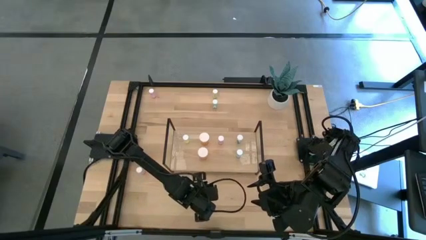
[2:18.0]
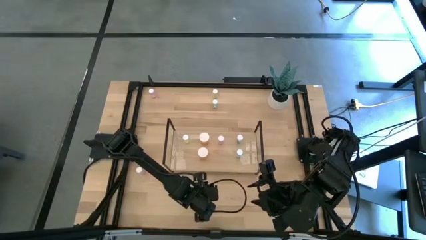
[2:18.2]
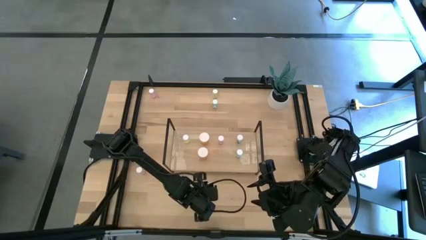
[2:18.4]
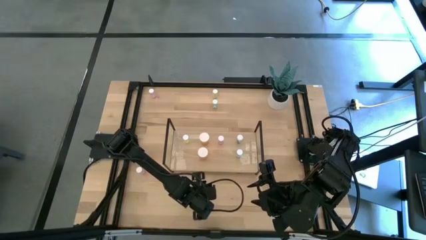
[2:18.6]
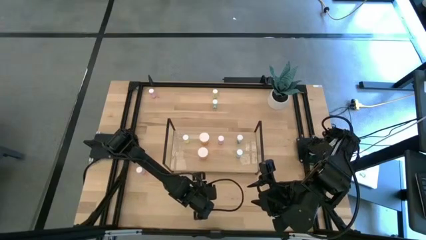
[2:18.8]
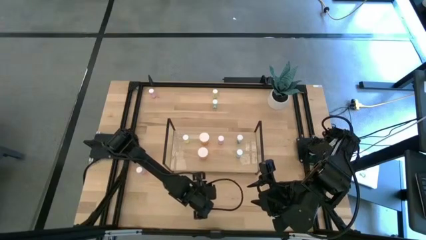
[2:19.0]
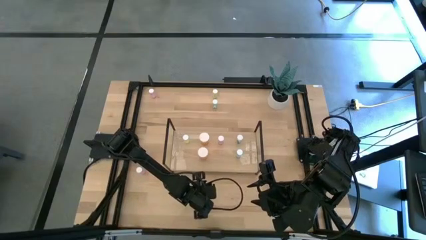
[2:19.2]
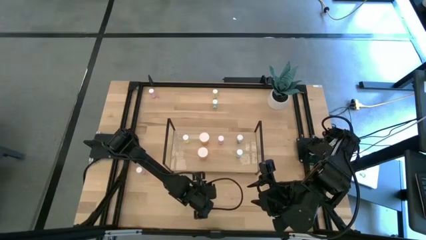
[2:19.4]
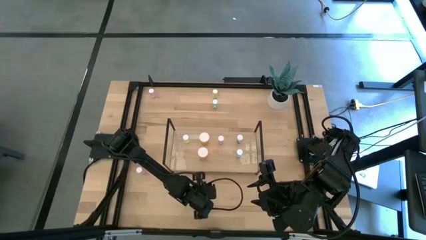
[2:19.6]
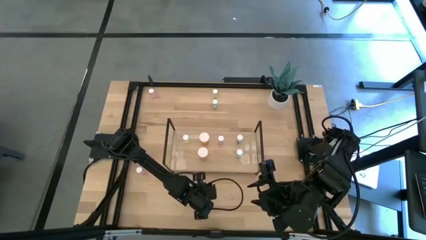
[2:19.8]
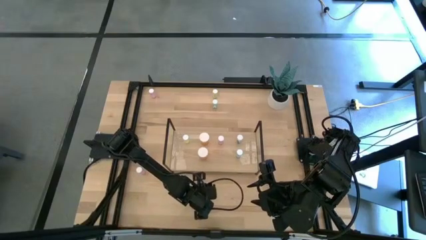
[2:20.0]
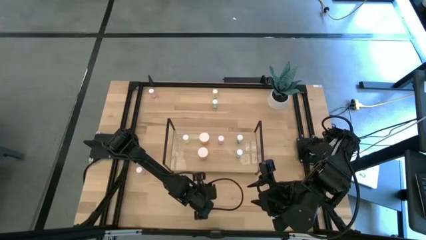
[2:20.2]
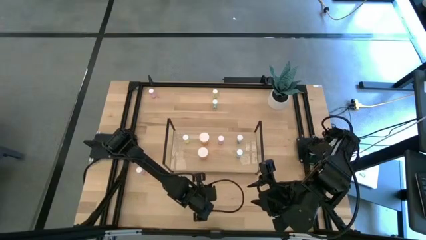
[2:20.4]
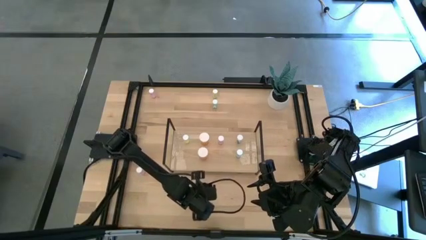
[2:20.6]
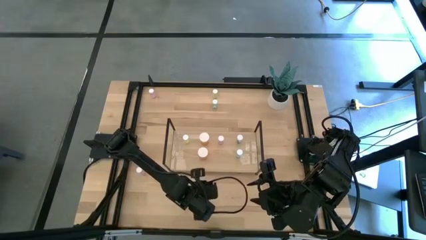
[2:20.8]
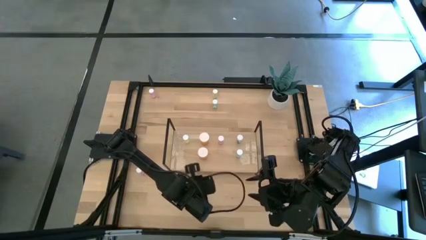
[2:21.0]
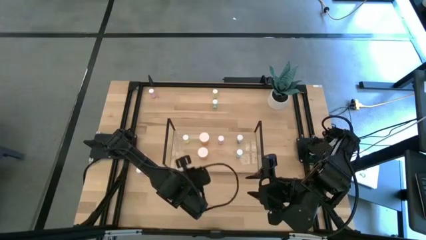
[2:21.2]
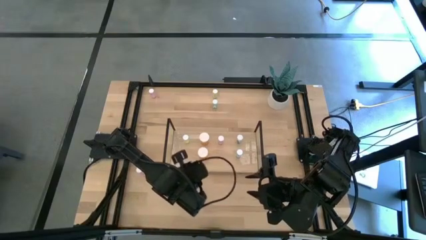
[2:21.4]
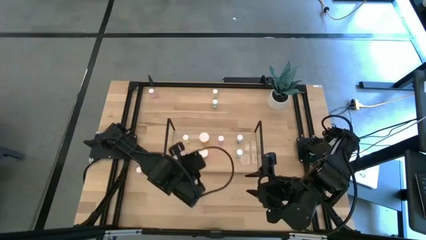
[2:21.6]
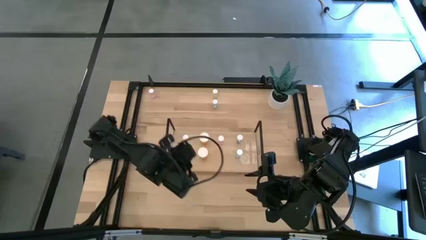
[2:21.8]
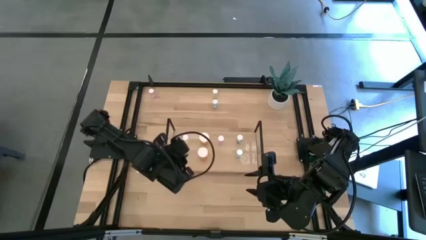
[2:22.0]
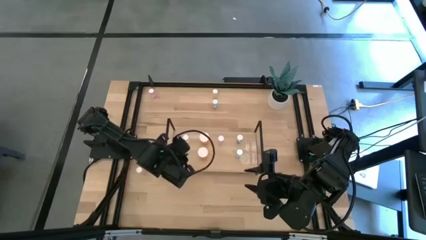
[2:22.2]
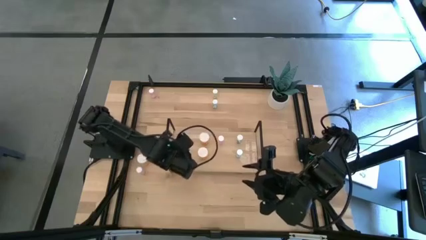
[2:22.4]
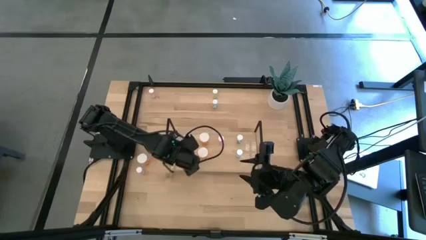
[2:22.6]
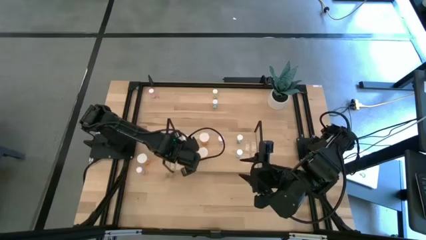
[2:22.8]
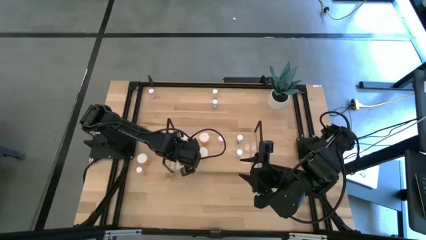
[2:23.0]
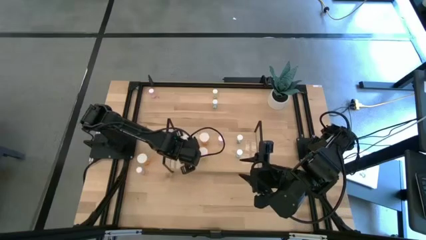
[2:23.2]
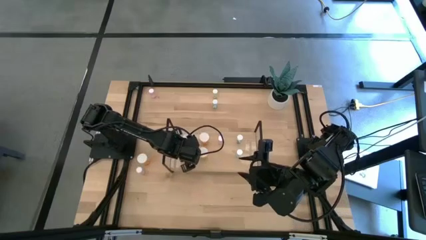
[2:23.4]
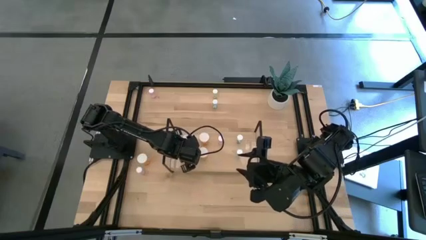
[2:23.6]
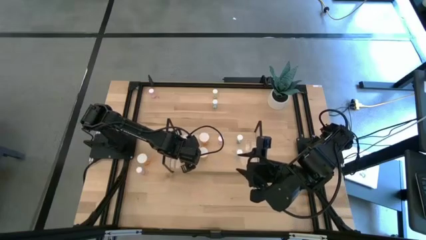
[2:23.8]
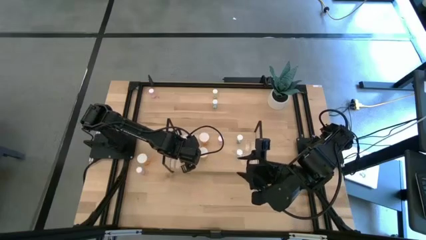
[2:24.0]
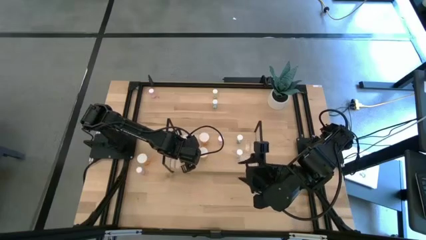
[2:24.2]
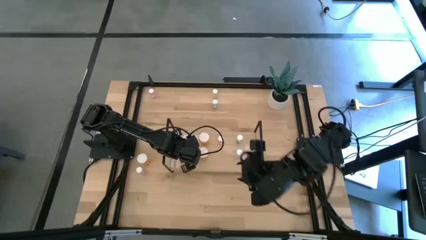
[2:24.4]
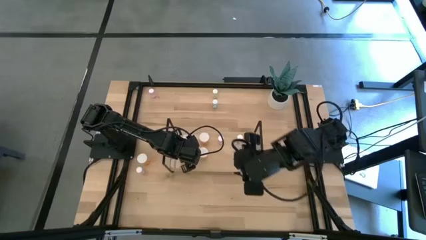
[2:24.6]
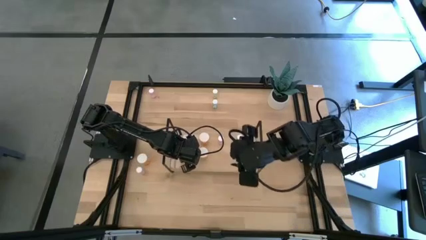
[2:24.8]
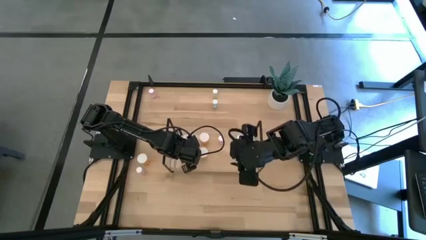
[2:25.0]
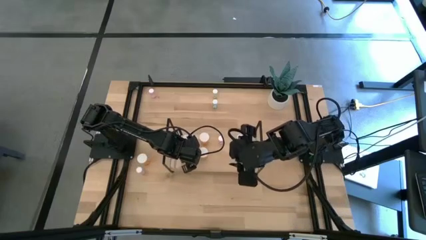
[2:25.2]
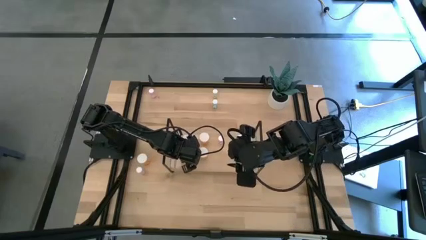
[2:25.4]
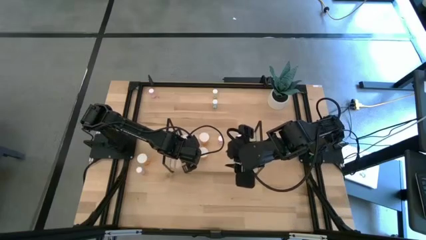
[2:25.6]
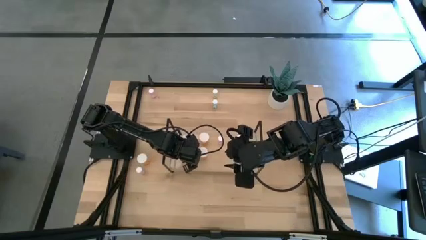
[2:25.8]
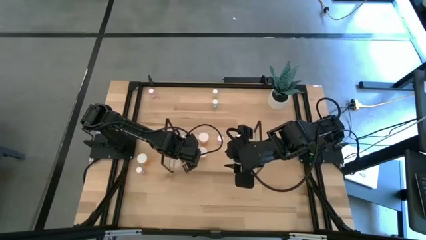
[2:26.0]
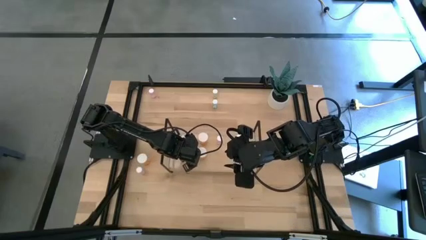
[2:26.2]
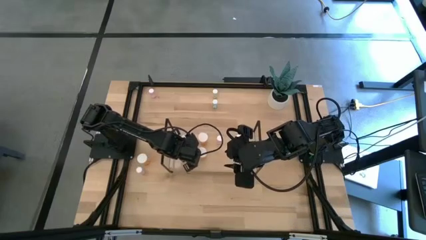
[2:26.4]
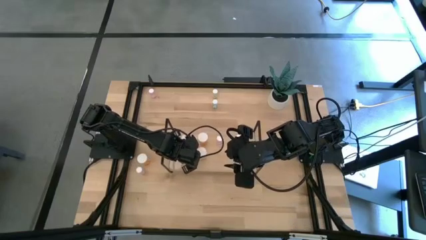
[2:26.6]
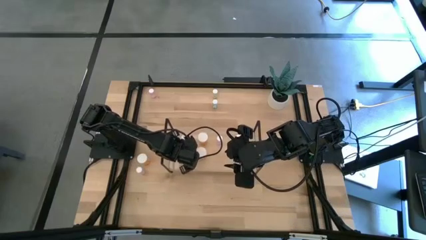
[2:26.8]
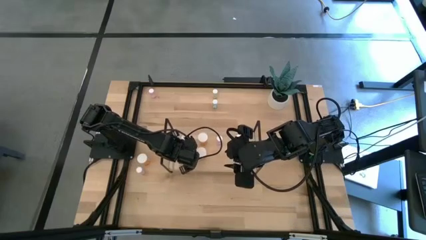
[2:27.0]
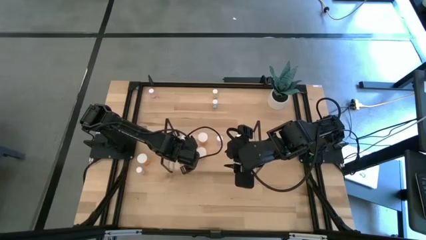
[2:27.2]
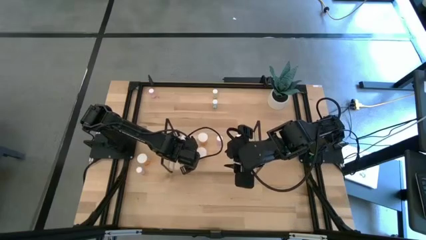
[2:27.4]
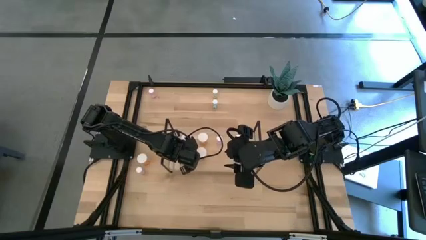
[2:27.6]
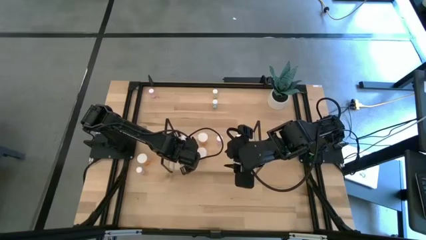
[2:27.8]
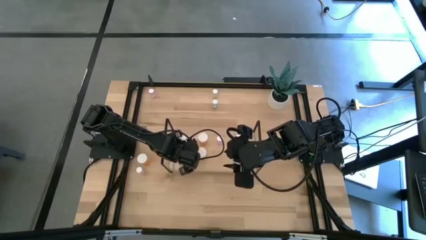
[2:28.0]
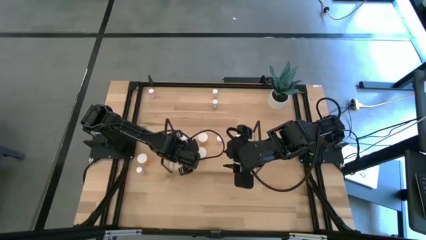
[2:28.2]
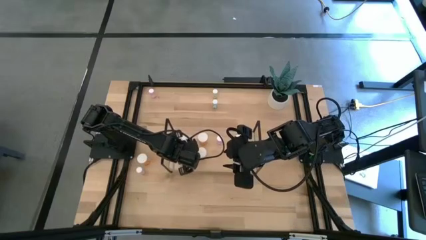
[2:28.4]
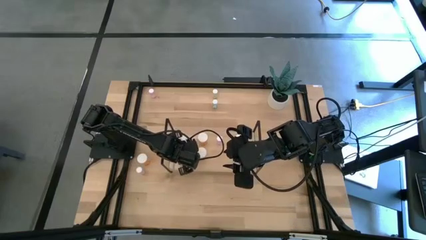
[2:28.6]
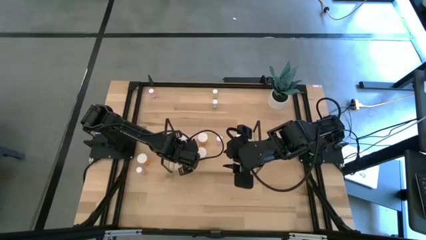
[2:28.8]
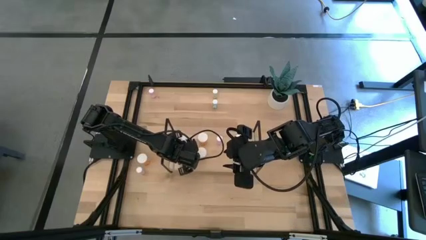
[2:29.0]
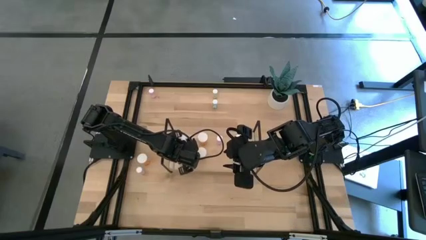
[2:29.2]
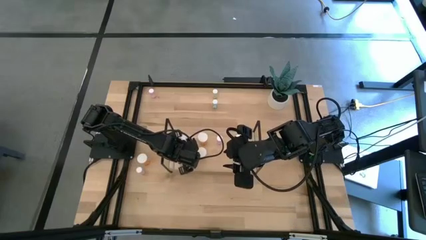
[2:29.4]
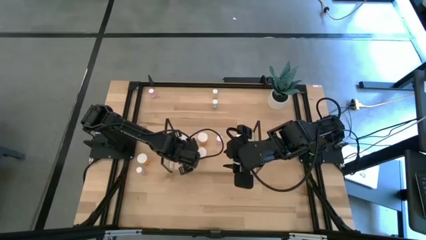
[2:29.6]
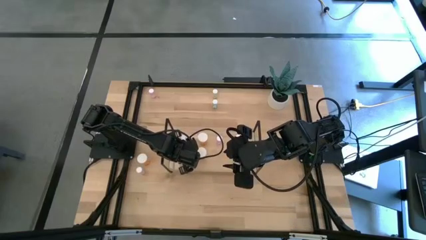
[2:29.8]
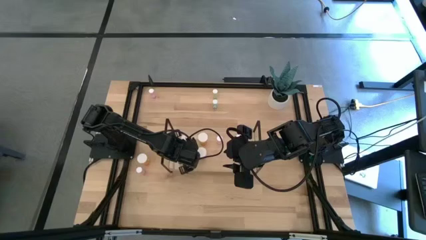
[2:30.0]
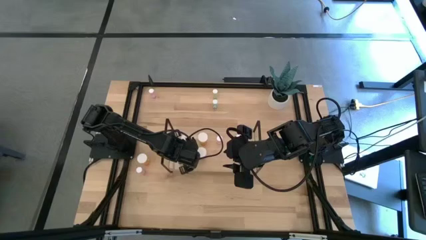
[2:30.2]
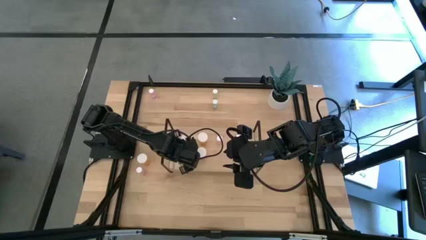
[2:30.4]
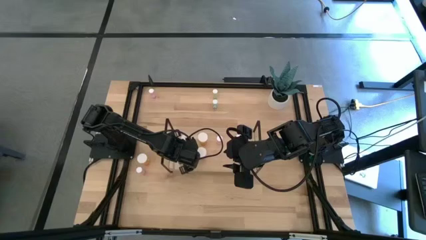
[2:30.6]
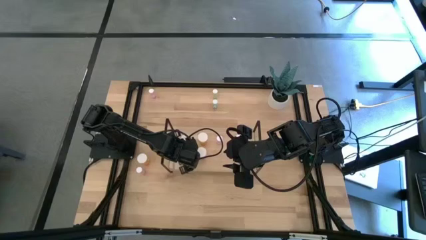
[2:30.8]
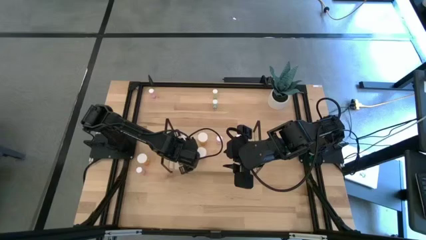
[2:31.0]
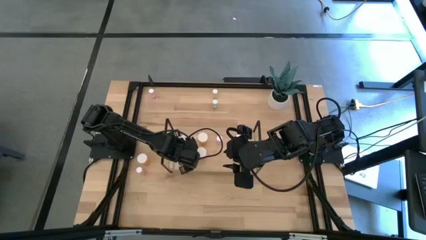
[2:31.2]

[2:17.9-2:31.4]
Task: Pick and place medicine bottles onto shelf by color
Put the right yellow pill bottle aligned with the yellow pill bottle on the shelf

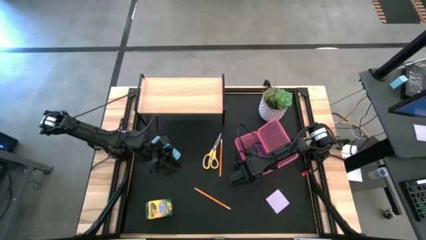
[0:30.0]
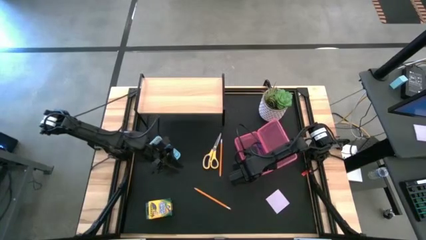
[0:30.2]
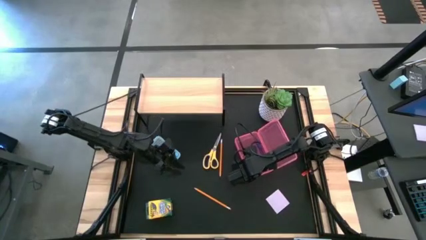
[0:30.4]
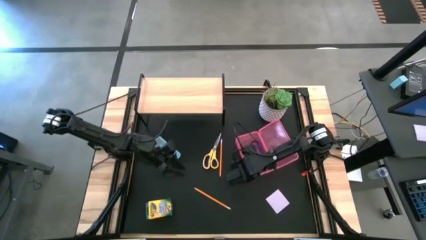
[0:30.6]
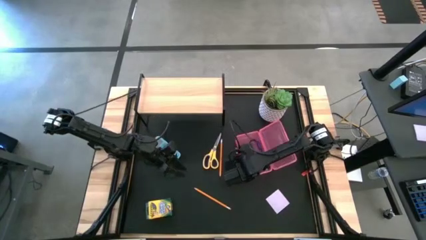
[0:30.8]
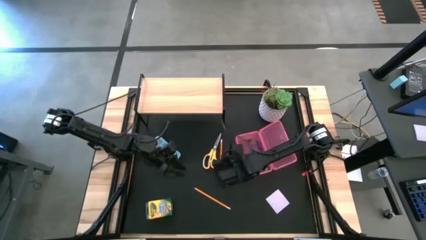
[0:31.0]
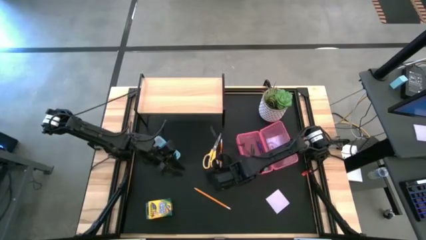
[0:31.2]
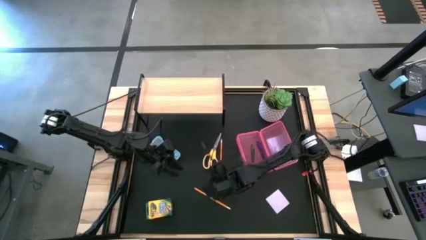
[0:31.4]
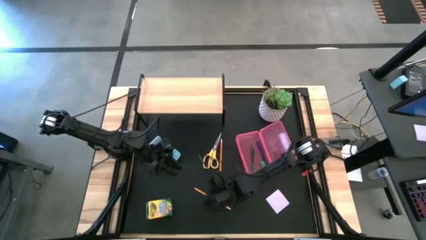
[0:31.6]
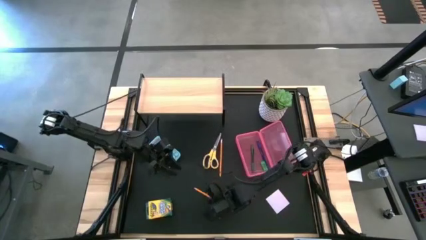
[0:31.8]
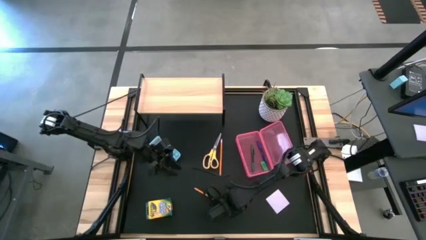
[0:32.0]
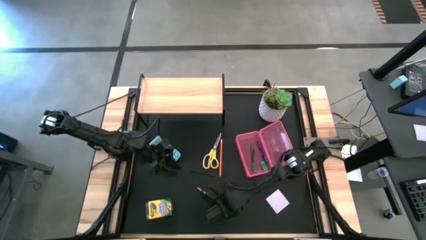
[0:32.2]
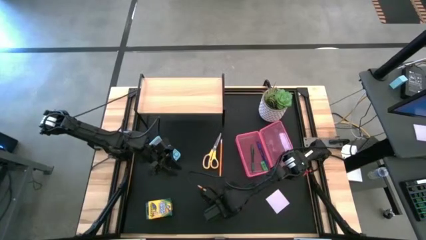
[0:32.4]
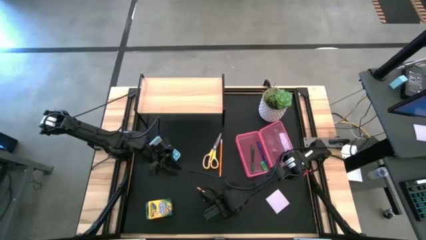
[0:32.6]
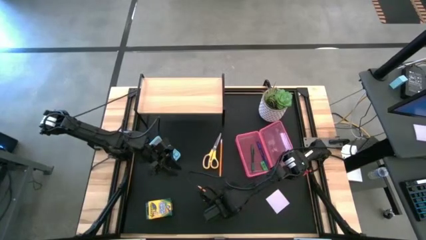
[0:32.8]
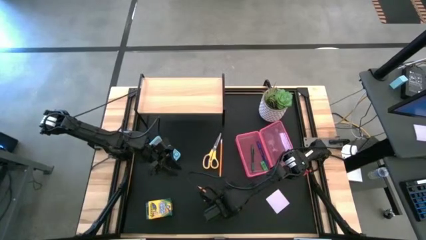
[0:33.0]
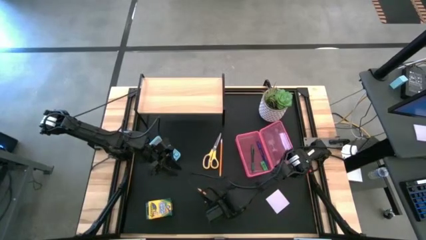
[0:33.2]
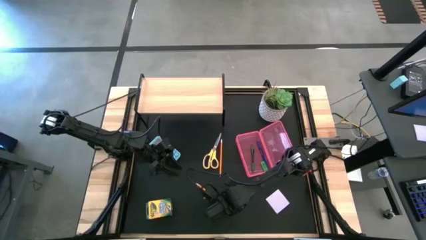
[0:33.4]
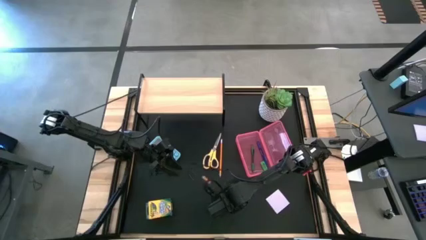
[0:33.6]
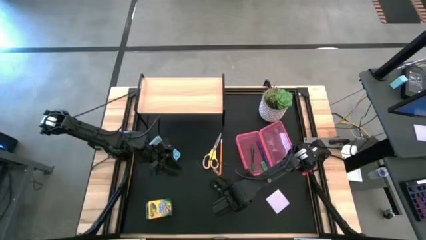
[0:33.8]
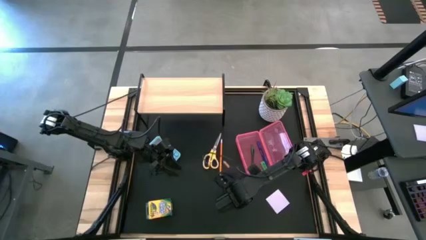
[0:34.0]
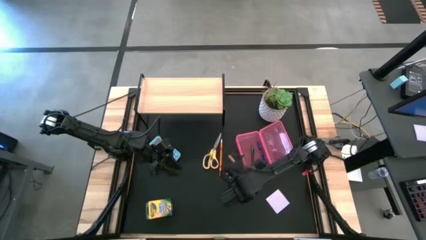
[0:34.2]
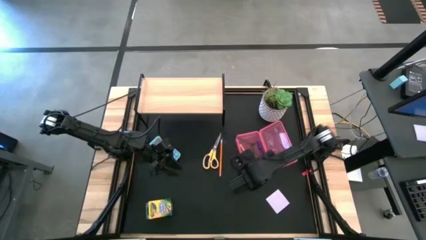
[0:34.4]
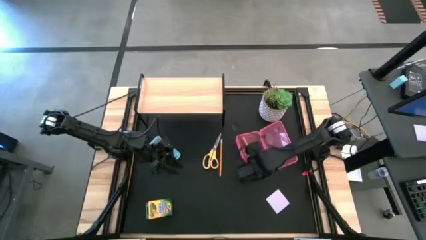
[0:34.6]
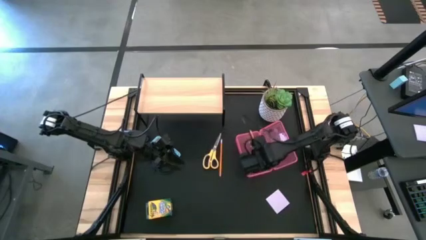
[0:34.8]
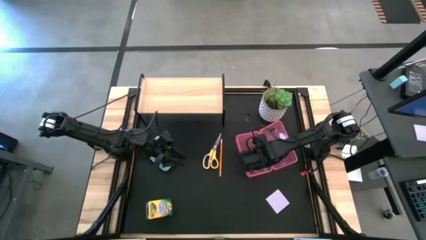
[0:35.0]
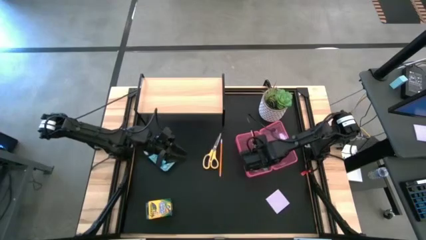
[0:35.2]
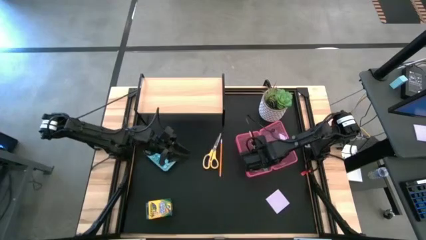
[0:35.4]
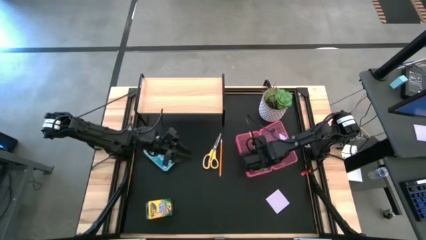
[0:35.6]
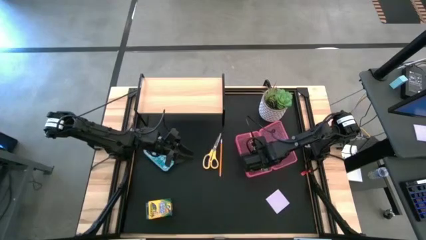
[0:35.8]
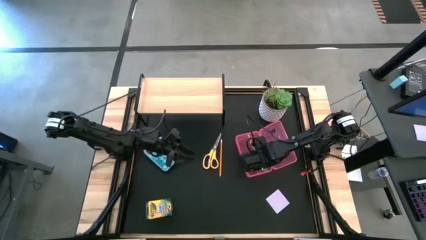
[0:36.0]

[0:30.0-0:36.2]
Task: Pack school essentials
Put the bottom orange pencil into the pink supply box
